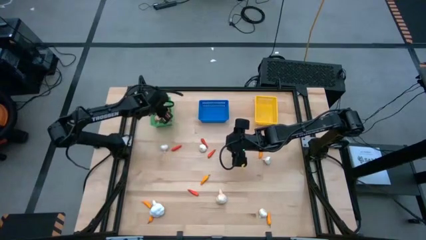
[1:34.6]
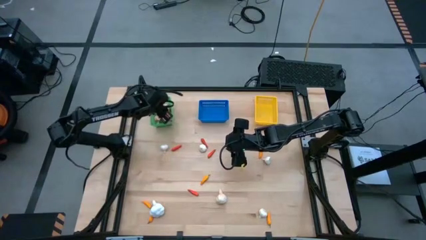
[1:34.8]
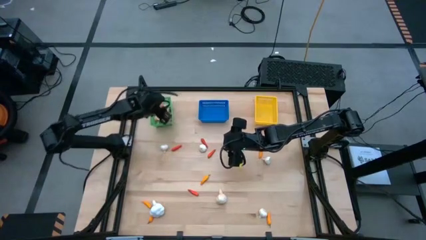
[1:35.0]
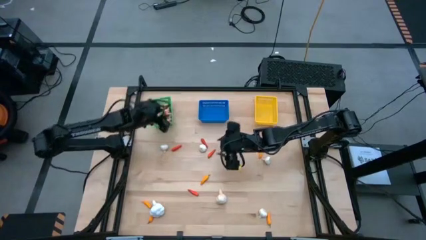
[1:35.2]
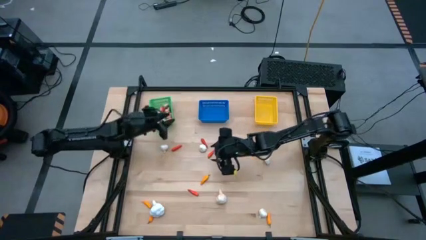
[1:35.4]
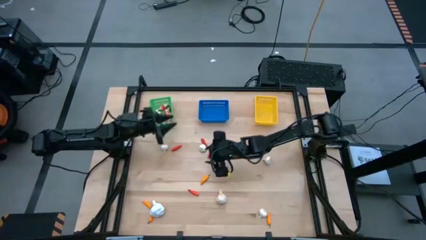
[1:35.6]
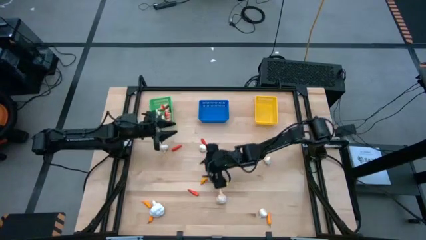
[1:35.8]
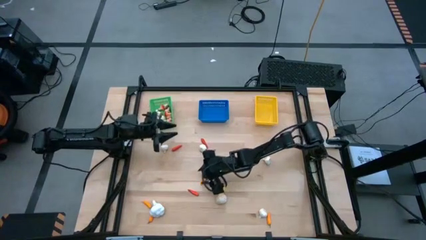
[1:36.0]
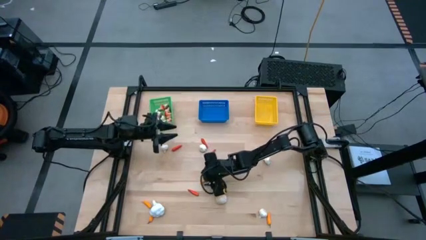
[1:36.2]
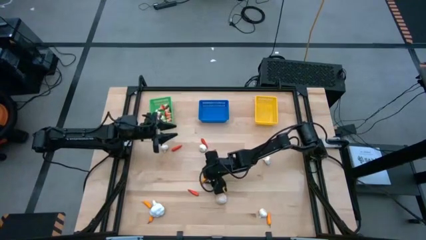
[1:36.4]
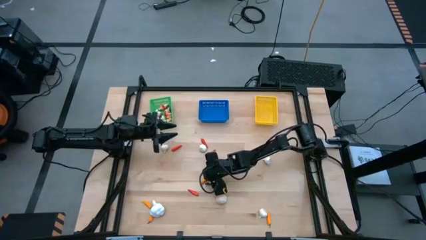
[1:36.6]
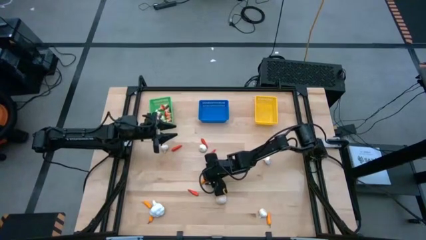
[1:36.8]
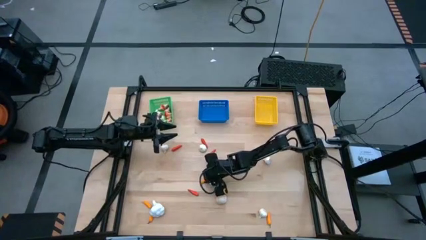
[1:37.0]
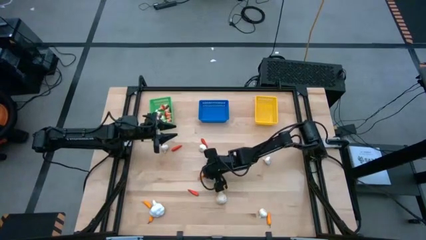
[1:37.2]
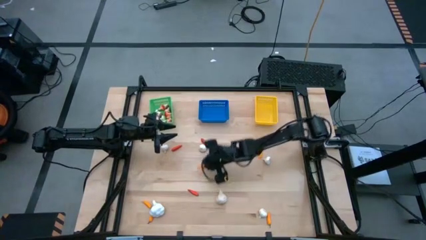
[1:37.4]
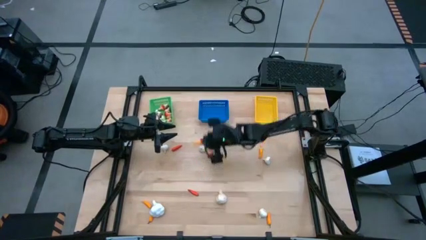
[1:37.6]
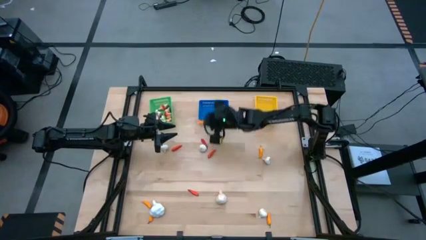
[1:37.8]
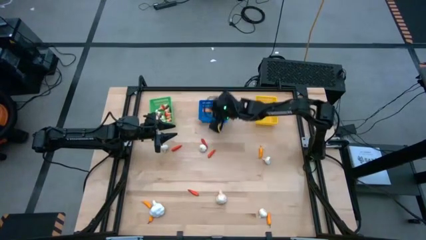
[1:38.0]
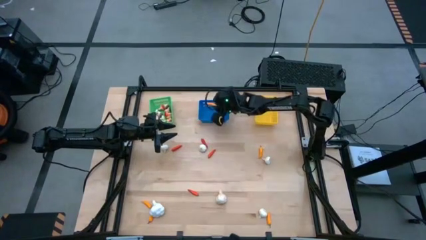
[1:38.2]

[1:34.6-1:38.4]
Task: Sort produce into baskets
Put the yellow chili pepper into the blue bin

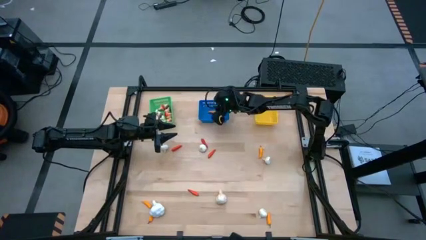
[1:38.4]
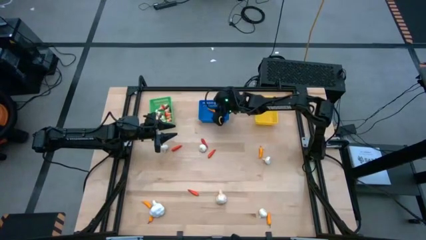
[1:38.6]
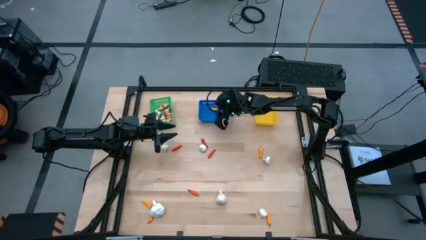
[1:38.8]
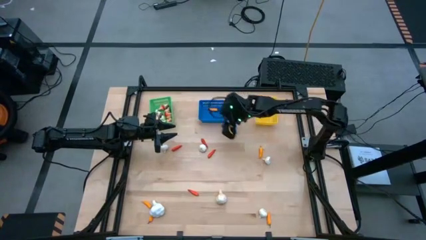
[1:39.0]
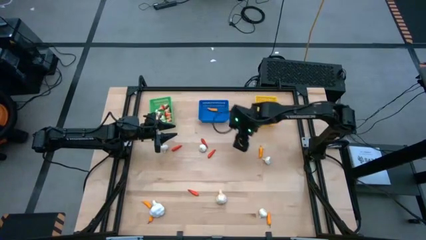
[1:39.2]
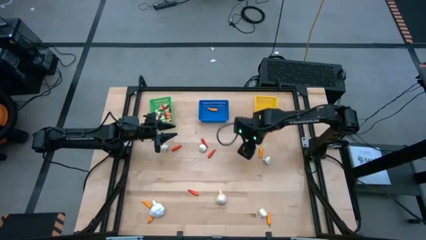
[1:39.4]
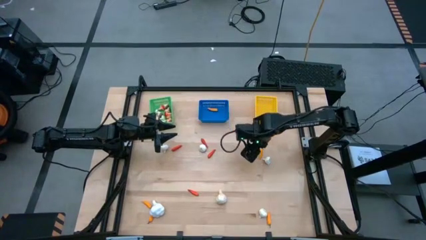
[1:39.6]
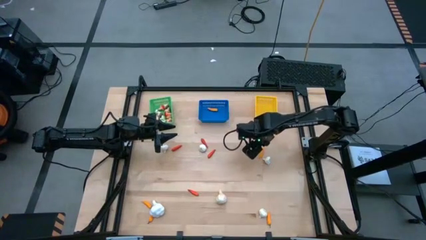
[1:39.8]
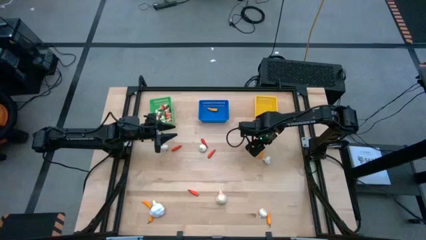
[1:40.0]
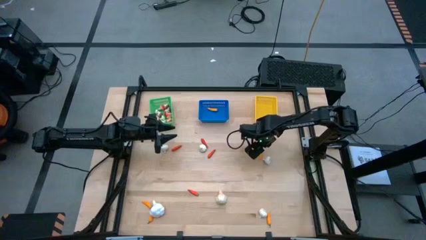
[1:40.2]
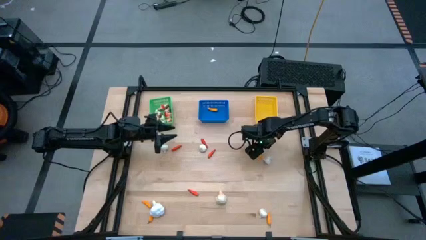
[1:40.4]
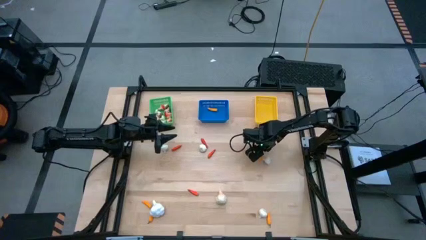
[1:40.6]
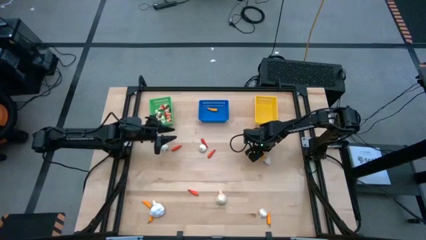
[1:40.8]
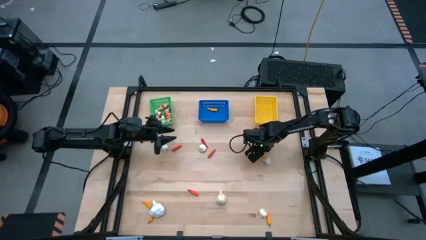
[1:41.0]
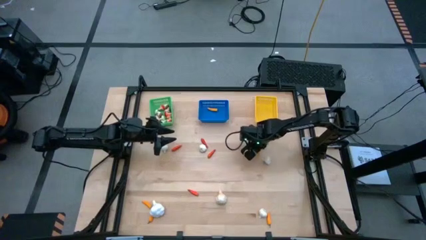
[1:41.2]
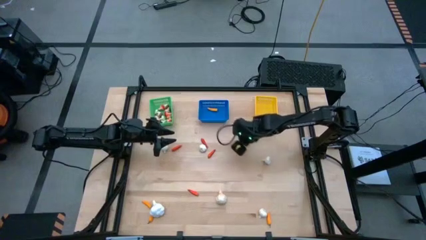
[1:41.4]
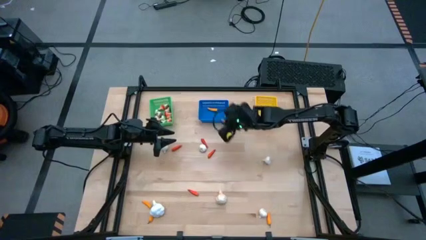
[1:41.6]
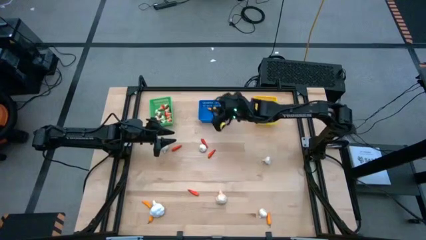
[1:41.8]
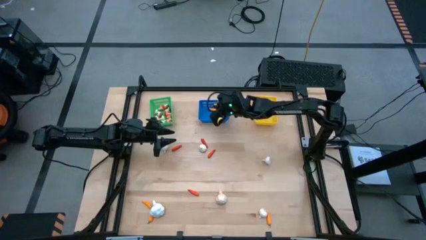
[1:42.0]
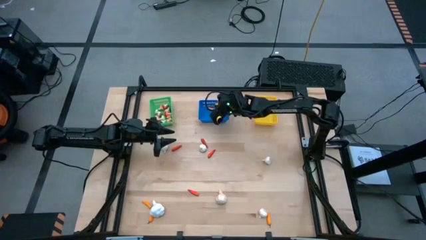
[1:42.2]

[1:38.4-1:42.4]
Put the yellow chili pepper into the blue bin

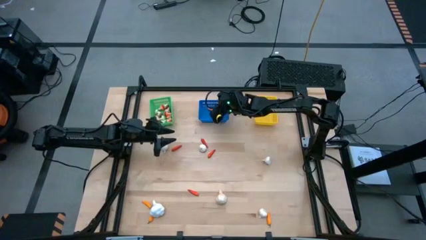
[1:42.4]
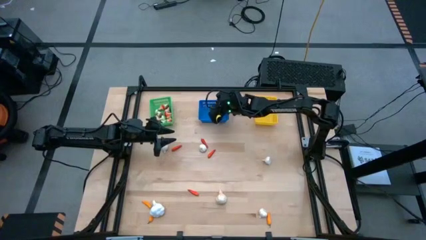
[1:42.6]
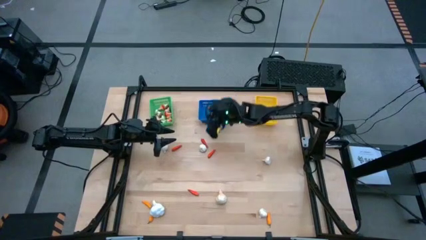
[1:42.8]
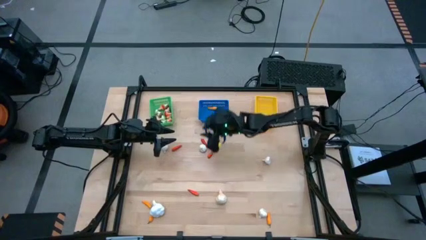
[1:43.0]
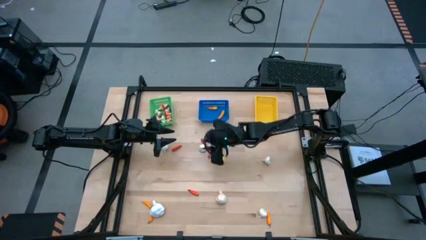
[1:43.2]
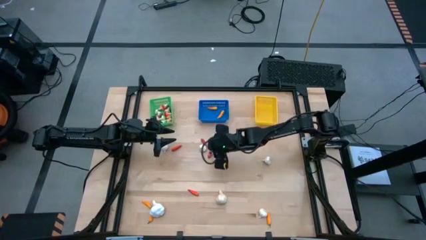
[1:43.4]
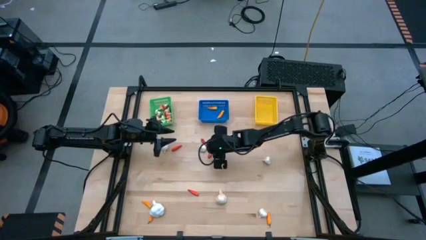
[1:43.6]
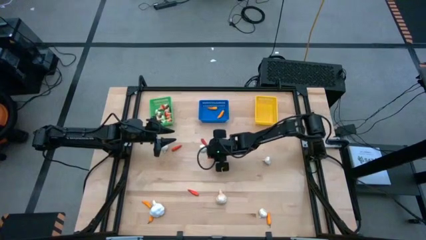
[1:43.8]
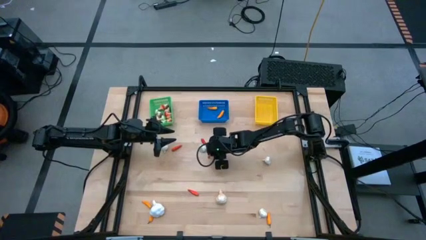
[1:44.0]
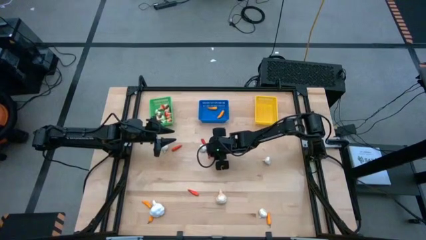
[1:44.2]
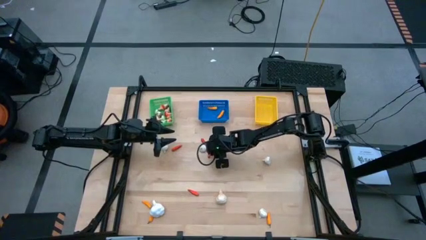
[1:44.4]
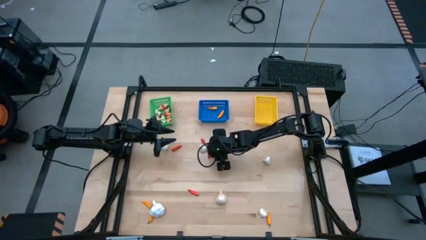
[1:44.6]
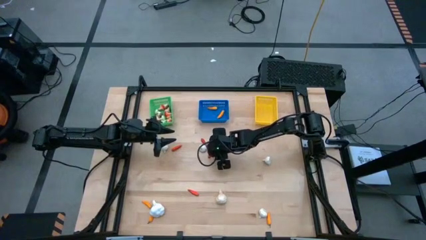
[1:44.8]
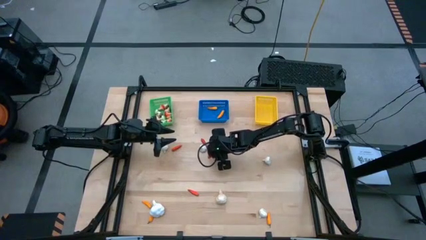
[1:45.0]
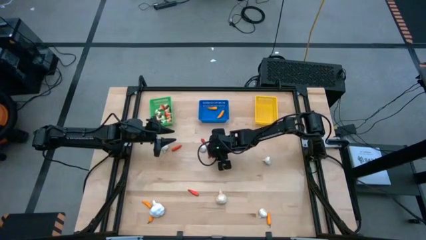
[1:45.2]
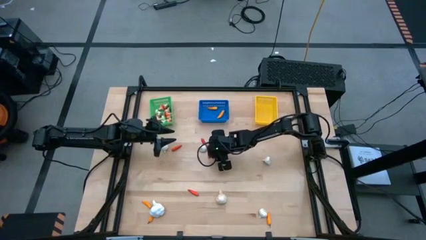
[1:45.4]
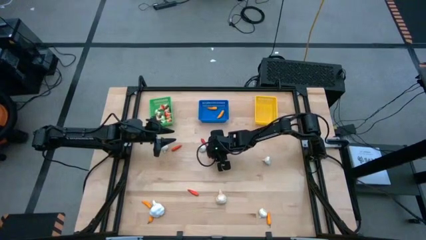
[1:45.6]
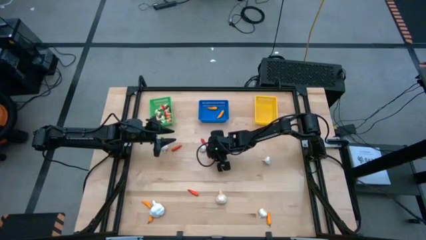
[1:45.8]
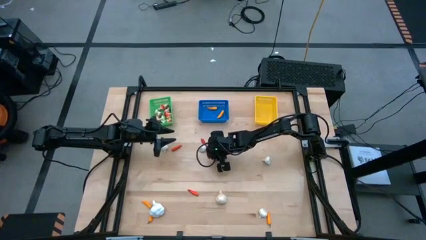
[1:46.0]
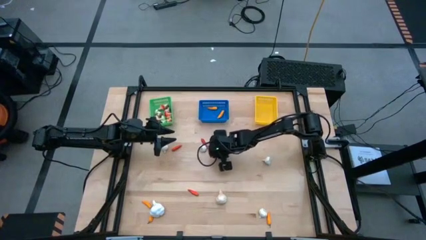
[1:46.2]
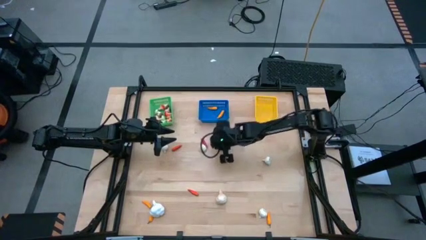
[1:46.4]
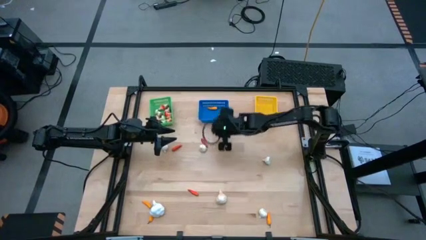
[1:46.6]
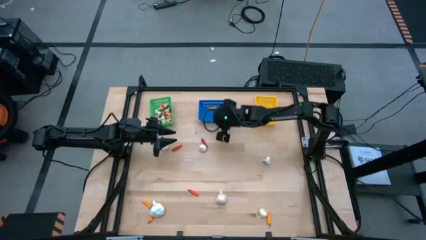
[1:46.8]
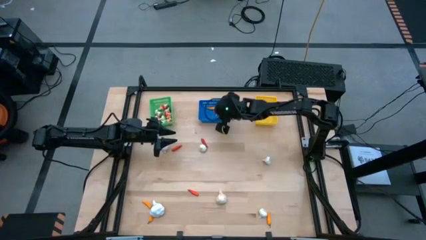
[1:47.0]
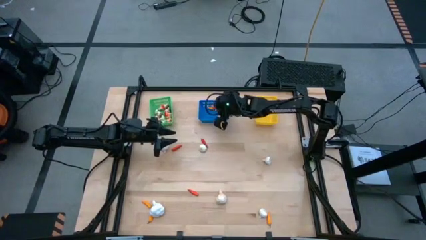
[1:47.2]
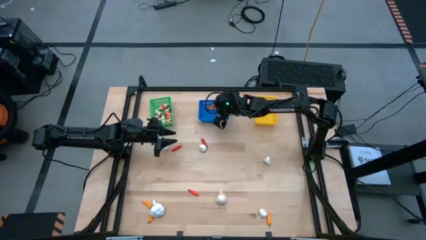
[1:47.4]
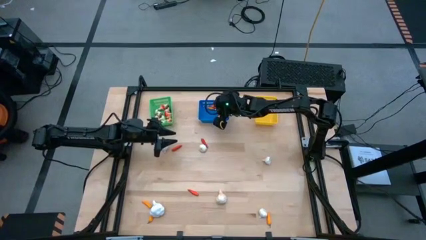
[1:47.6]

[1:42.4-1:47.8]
Put the orange chili pepper into the blue bin

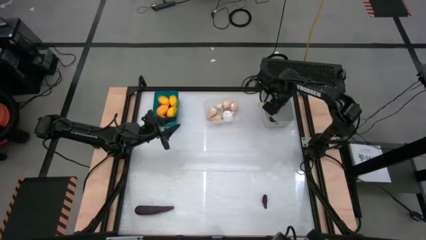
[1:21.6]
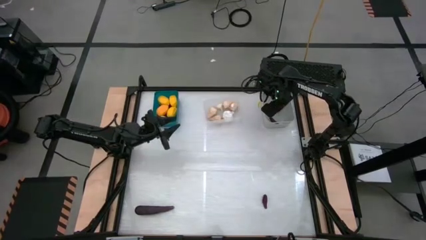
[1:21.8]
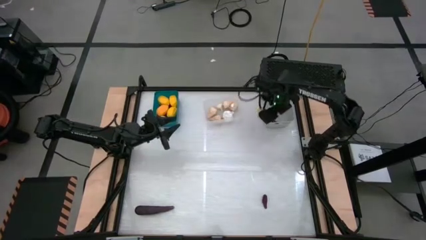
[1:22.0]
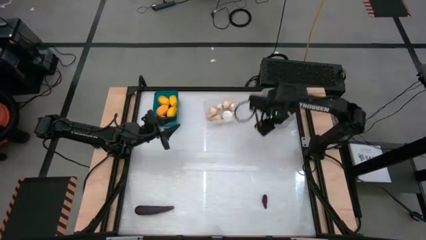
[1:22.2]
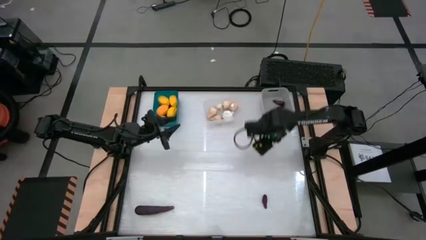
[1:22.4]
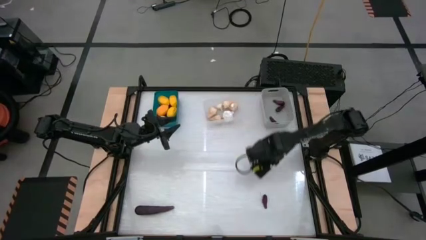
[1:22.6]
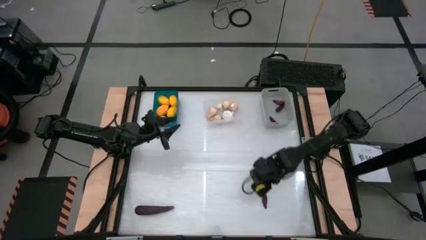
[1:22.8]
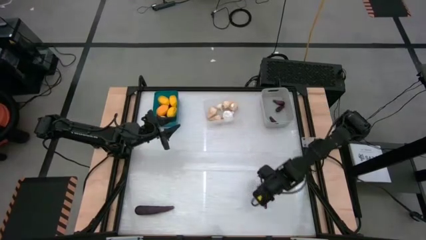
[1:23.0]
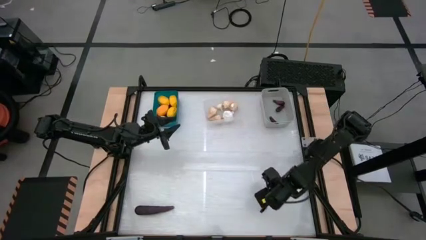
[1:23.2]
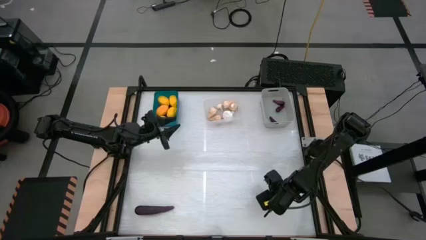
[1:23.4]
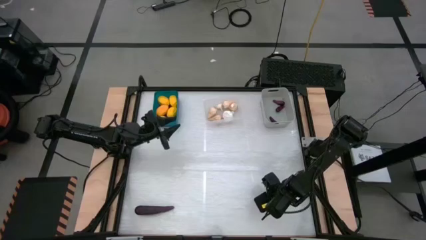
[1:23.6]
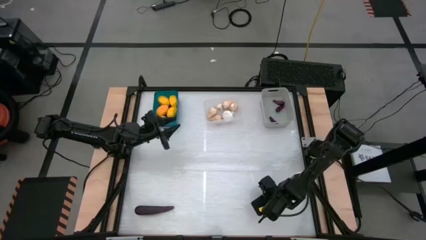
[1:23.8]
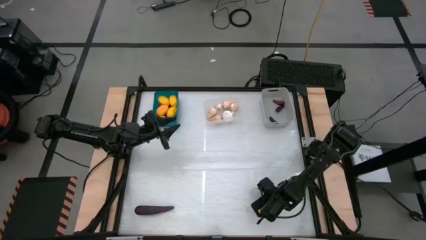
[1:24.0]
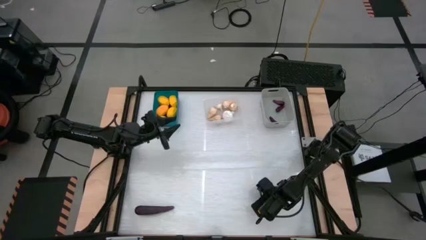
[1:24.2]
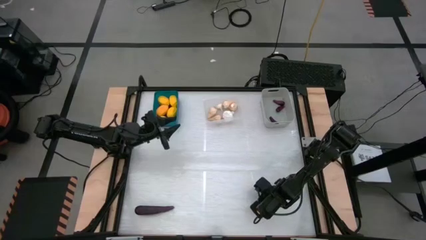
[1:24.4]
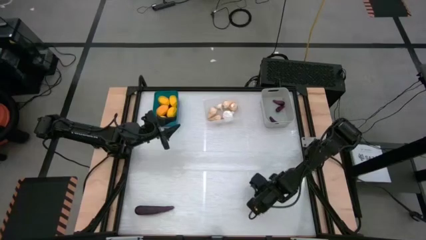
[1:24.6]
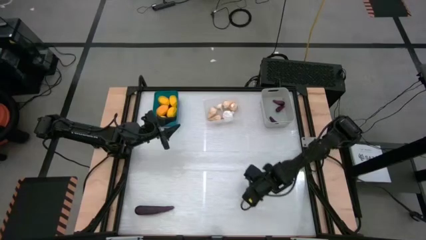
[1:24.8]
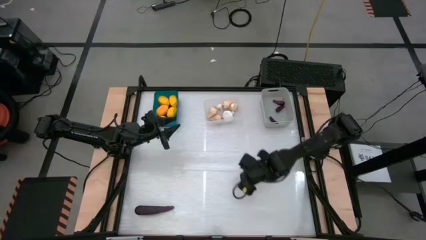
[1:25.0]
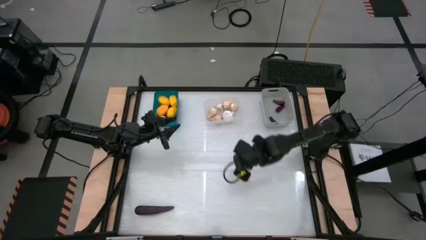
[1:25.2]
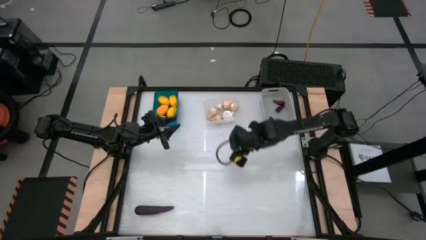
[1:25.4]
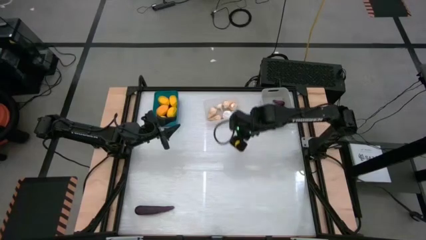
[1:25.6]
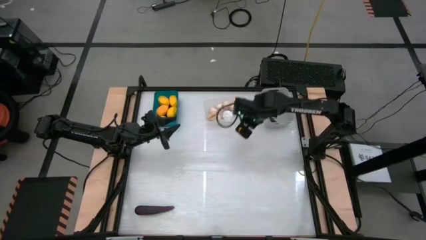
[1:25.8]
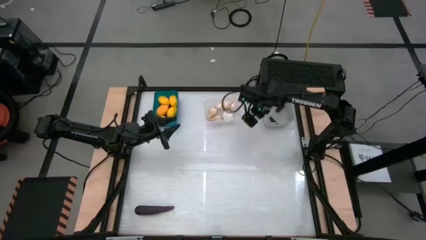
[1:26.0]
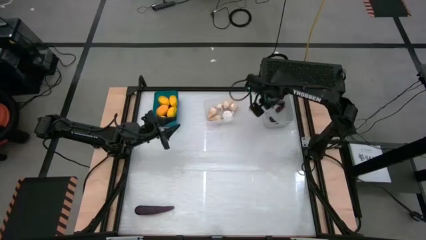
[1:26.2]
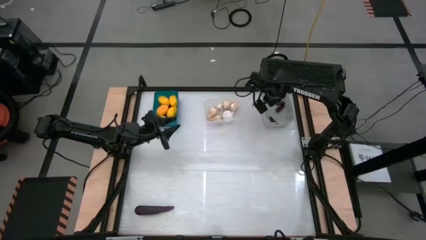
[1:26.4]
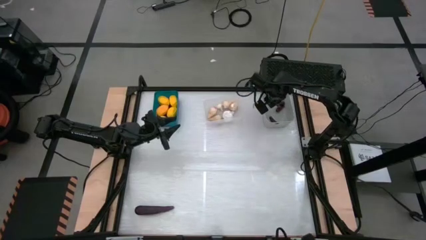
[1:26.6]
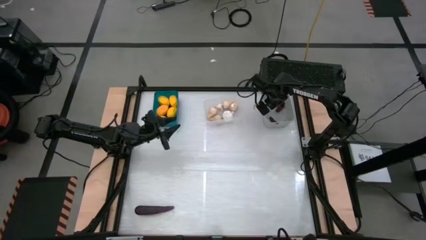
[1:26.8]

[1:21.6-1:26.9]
Task: Sort produce into baskets
Put the eggplant into the gray bin
